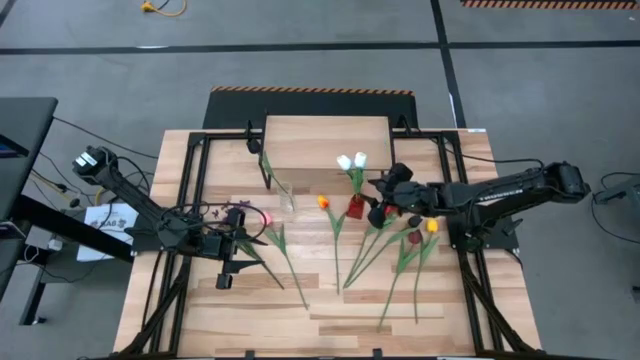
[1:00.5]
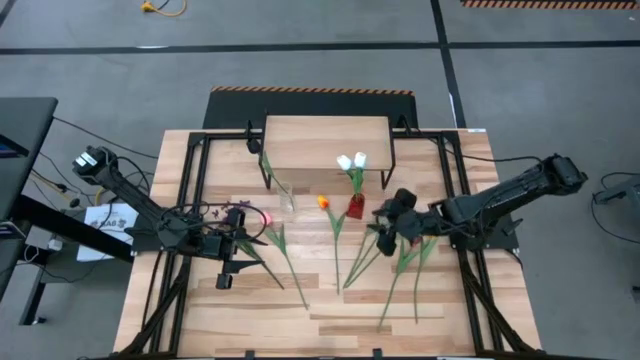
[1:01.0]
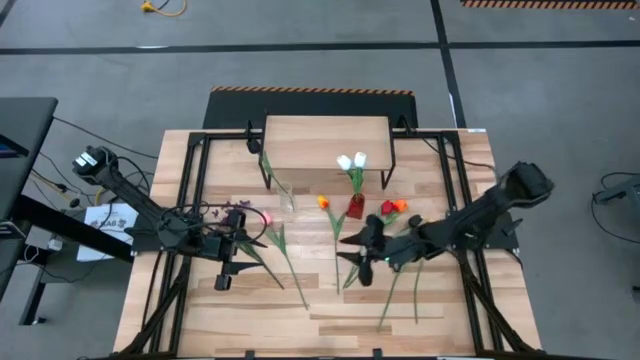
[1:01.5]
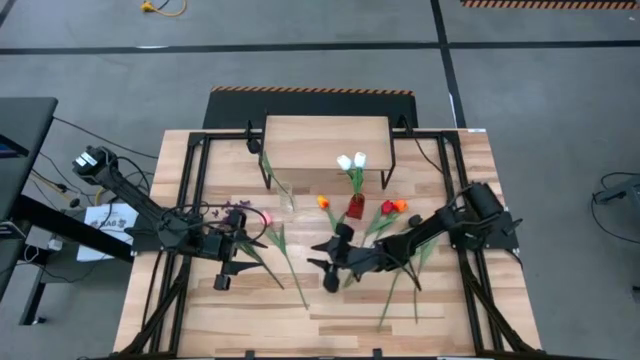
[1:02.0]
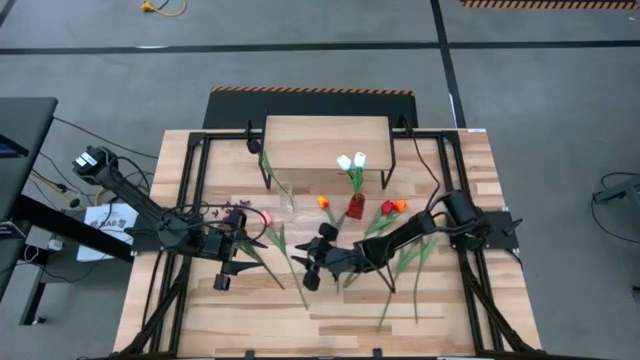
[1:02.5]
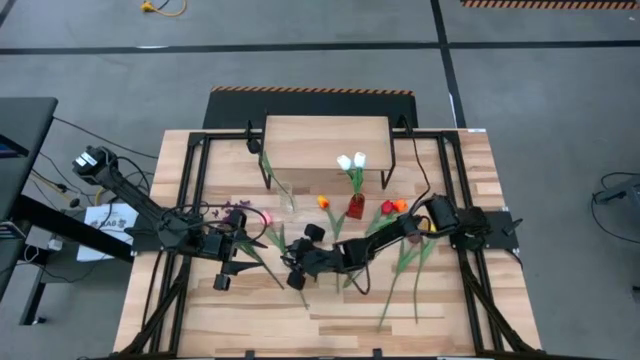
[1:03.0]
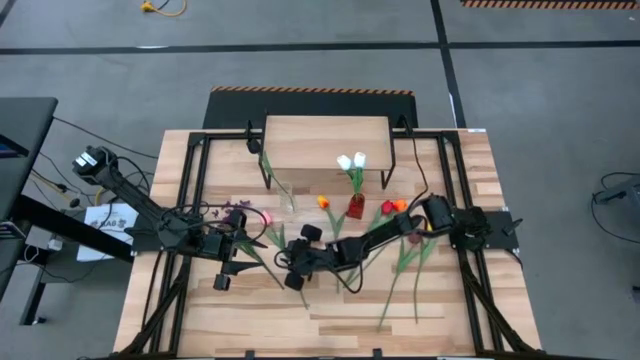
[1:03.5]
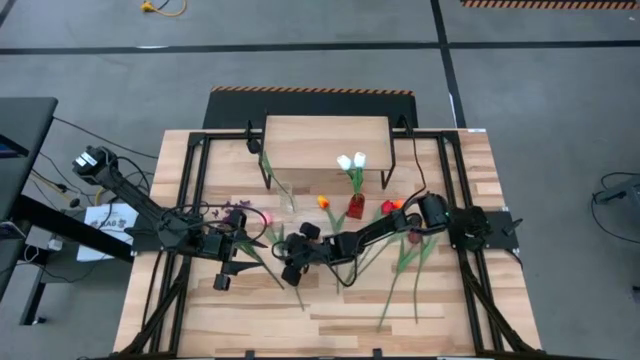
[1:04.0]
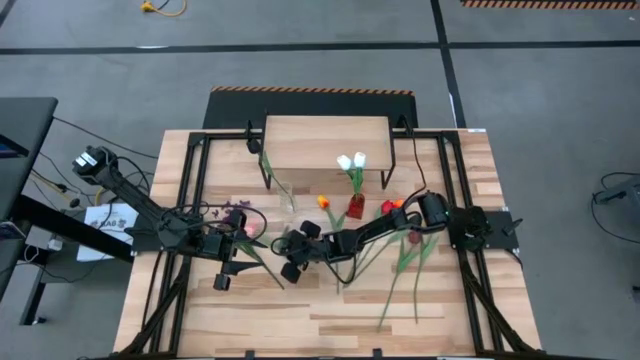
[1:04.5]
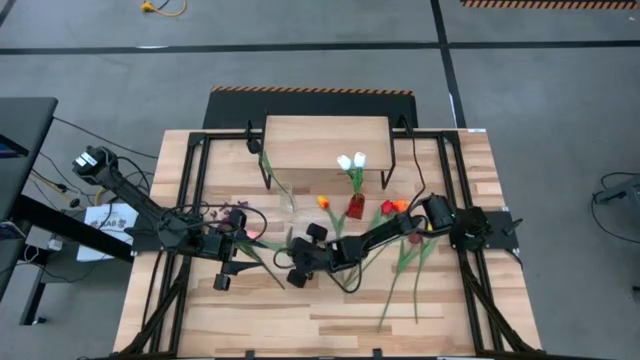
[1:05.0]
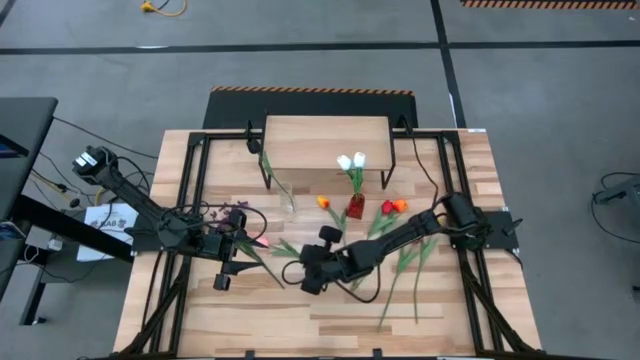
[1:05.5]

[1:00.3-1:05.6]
Task: Pick and place flowers into a vace then onto a shelf
Put the pink flower into the red vase

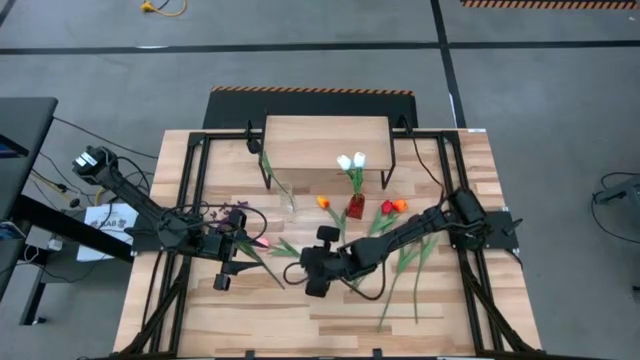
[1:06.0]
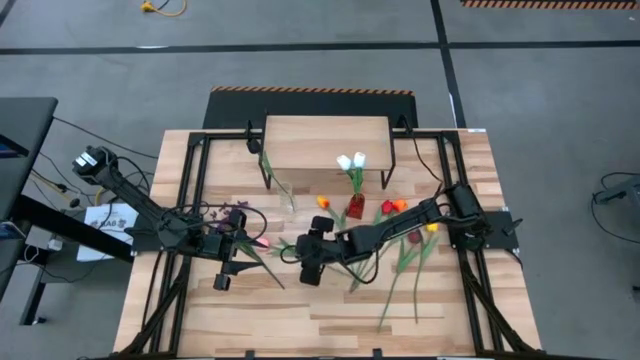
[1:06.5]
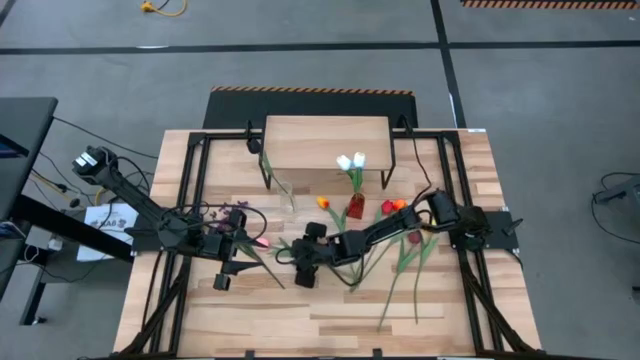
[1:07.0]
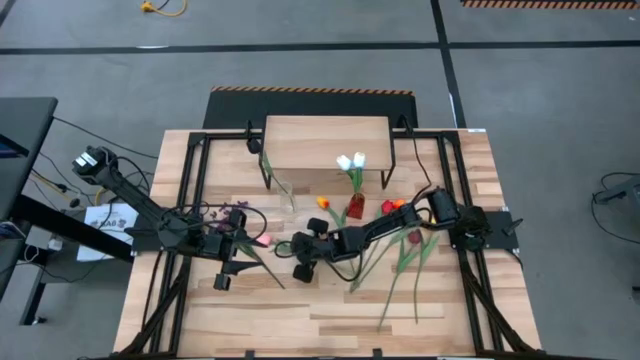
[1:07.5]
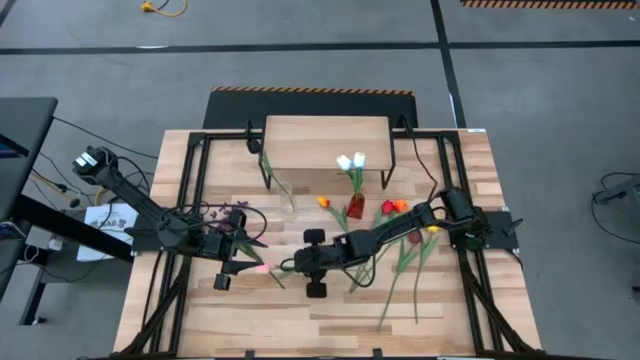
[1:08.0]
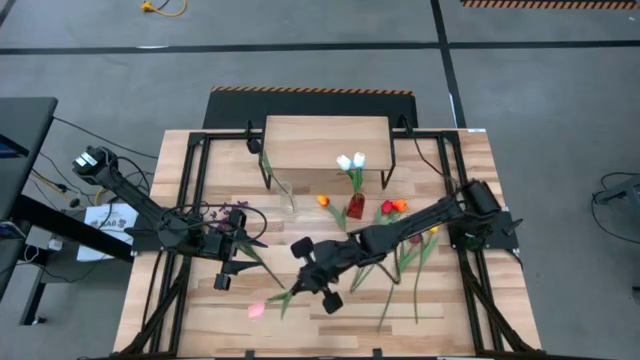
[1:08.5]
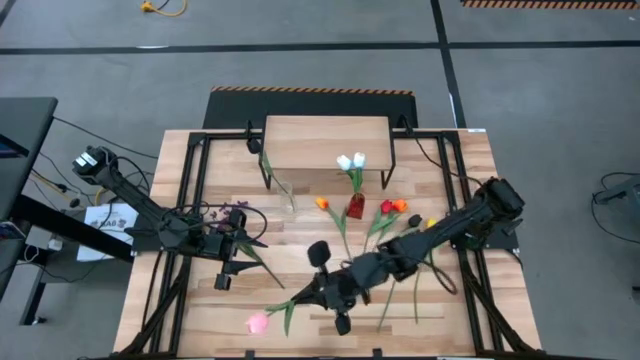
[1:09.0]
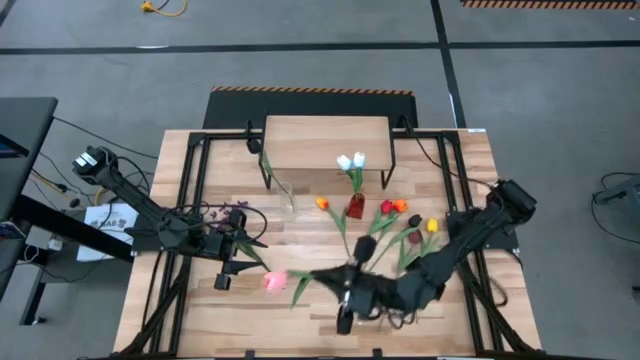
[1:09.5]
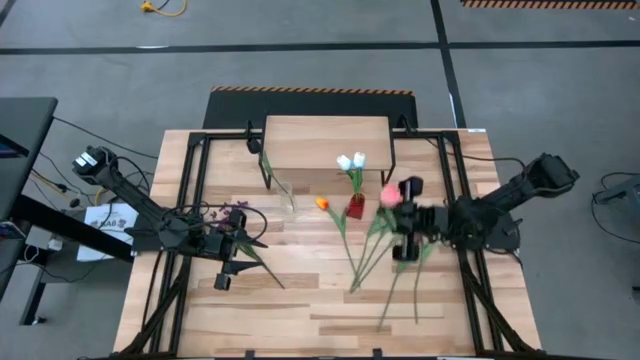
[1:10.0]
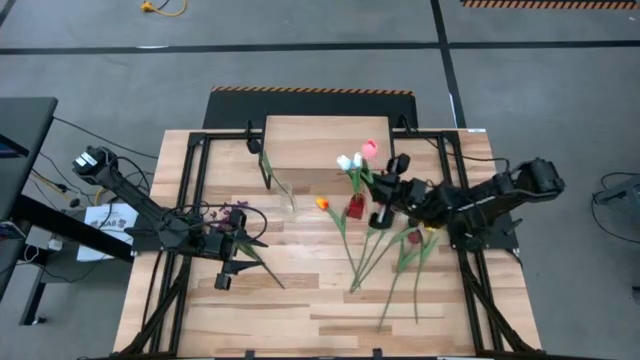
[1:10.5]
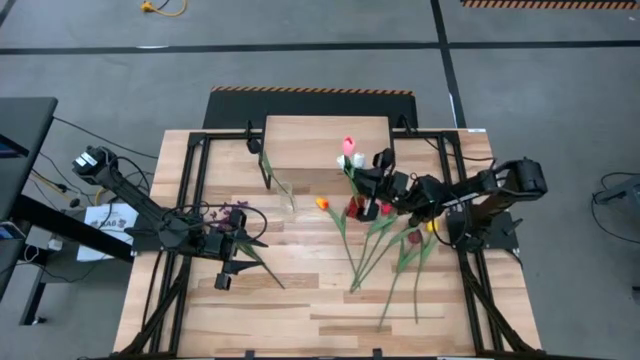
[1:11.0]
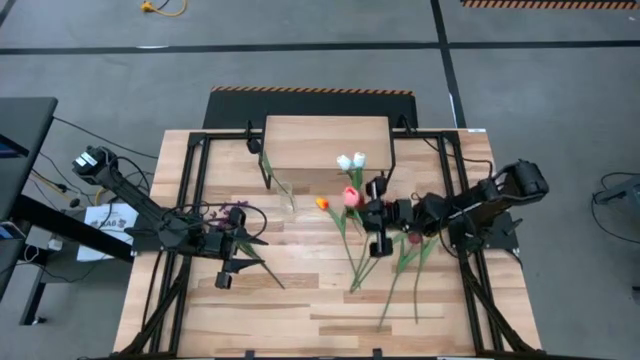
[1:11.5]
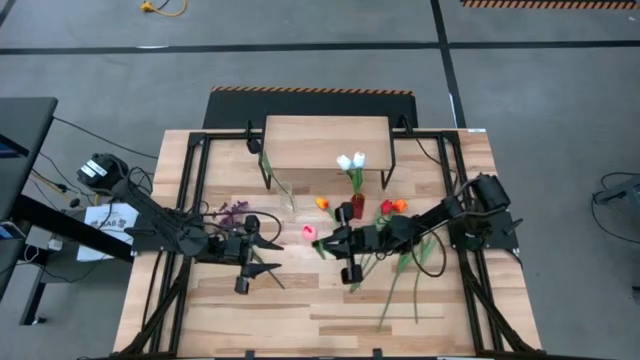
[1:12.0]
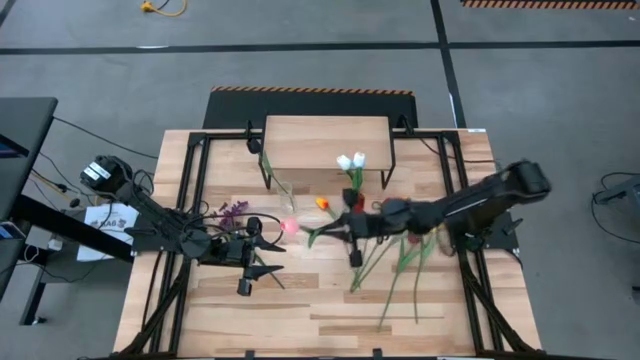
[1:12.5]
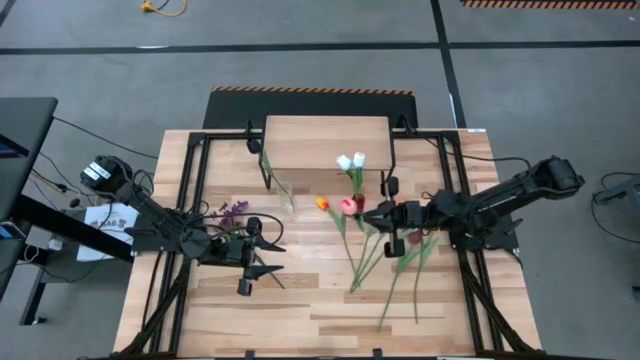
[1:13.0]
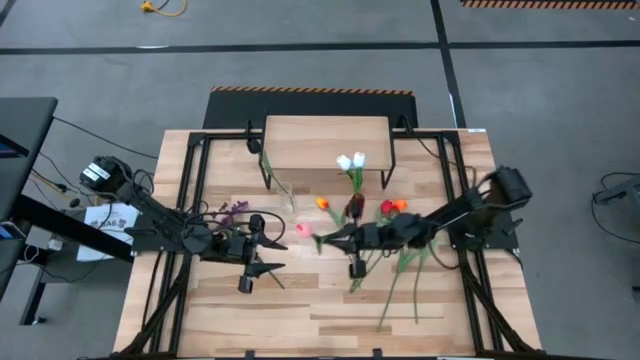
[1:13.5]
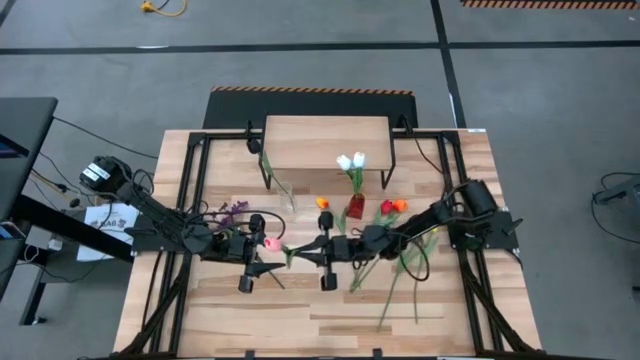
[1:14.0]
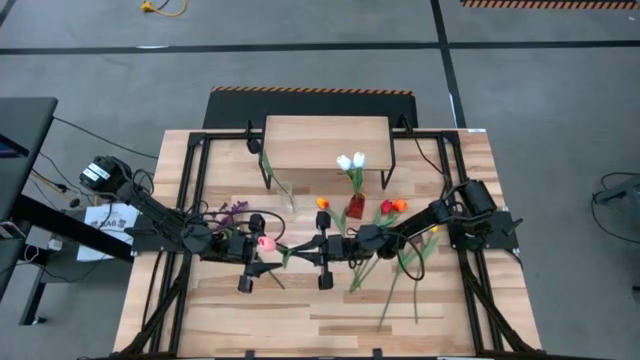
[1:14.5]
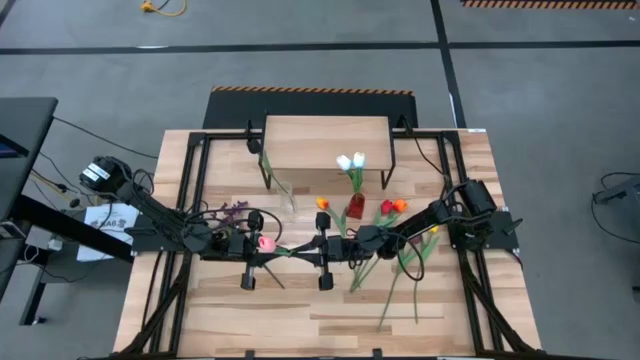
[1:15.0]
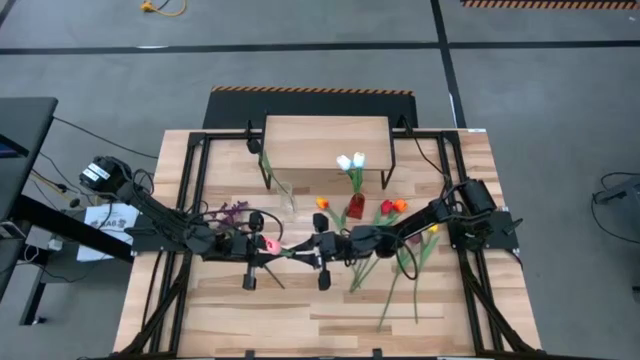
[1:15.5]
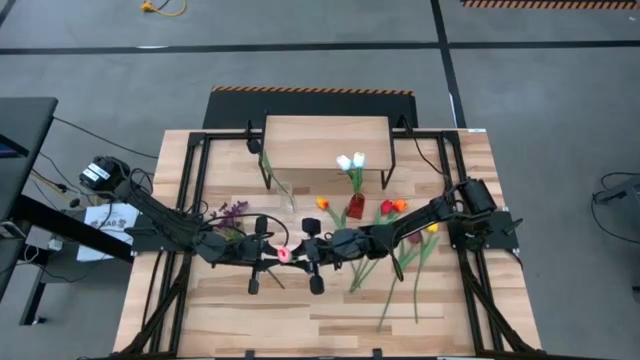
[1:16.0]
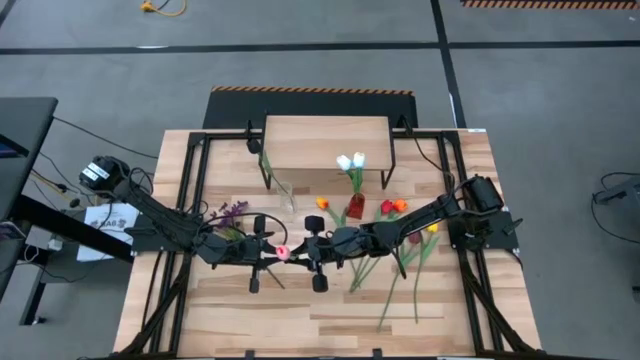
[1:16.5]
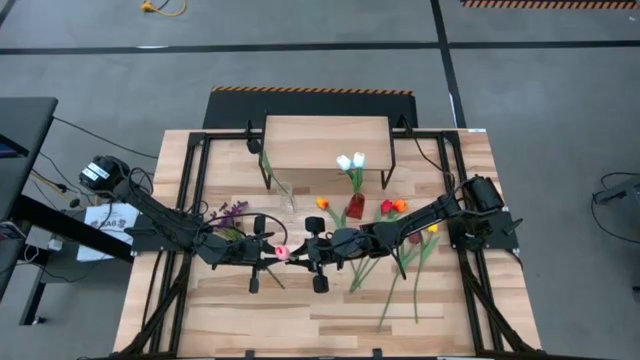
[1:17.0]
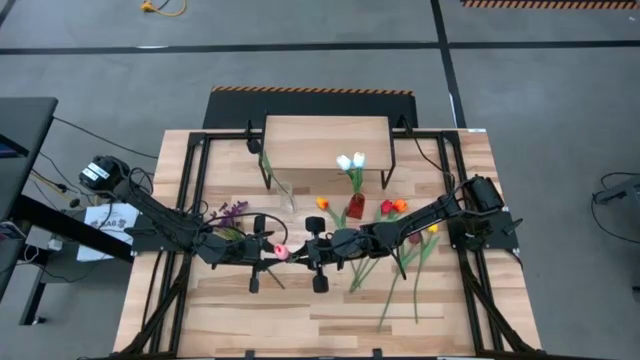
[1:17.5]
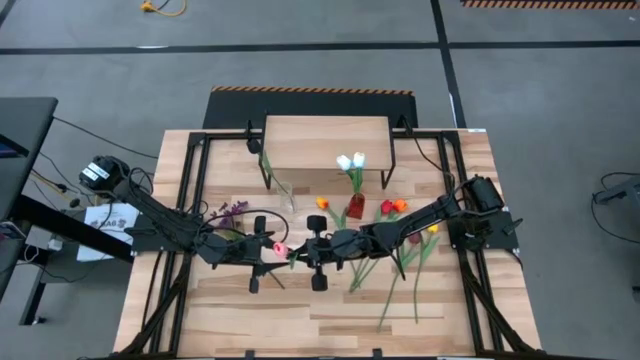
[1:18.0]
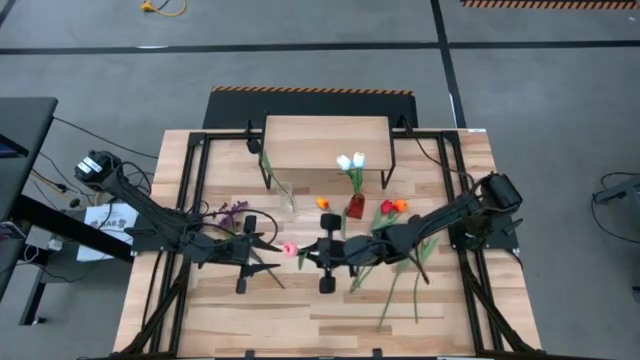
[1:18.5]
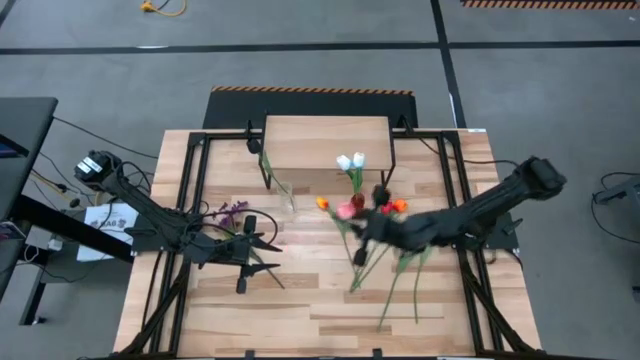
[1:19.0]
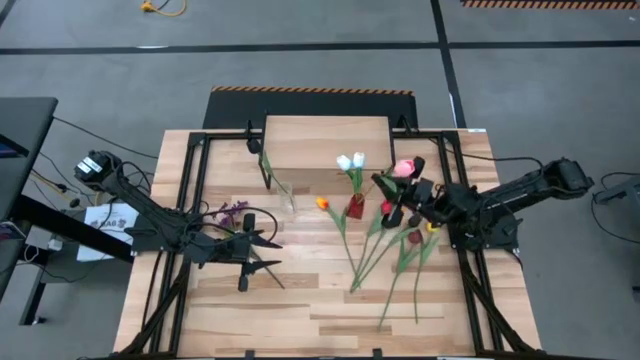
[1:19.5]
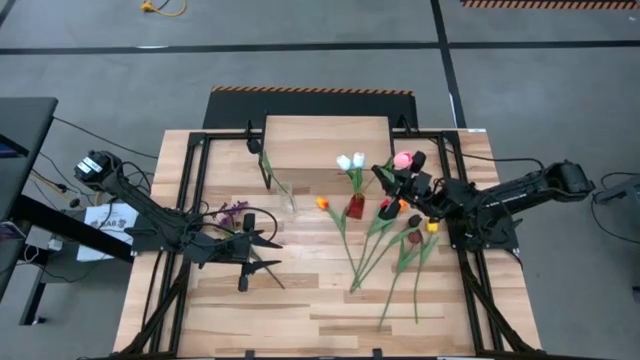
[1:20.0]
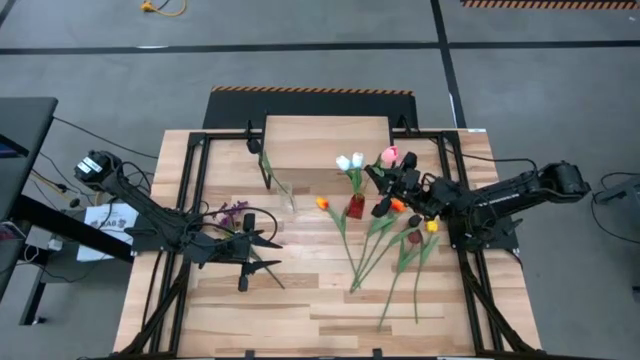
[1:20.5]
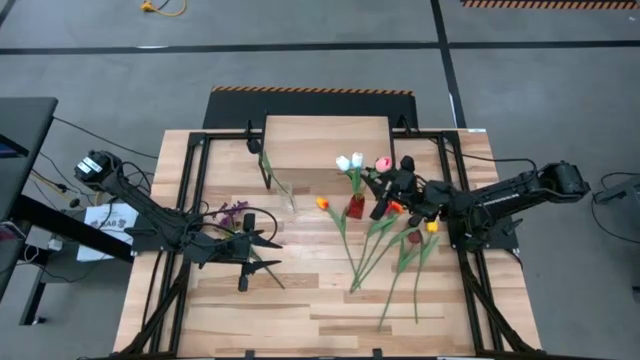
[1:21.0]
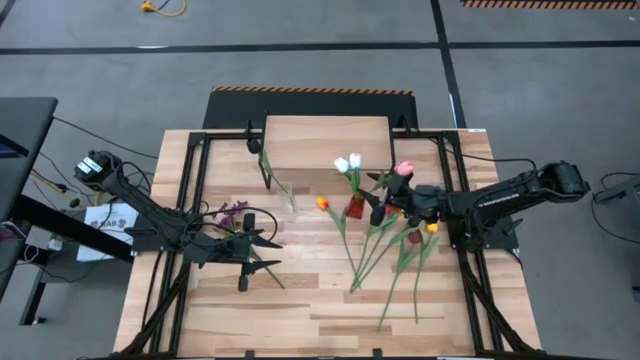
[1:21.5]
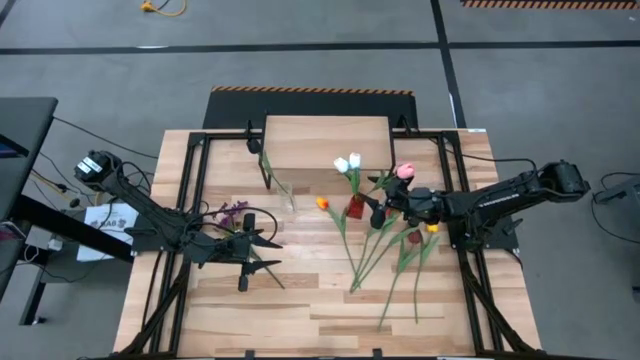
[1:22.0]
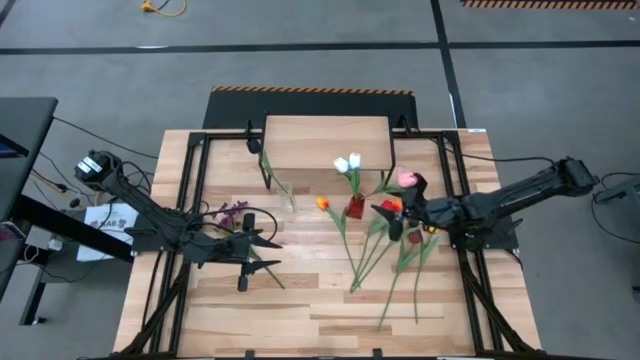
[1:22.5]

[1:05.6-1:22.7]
Put the pink flower into the red vase
